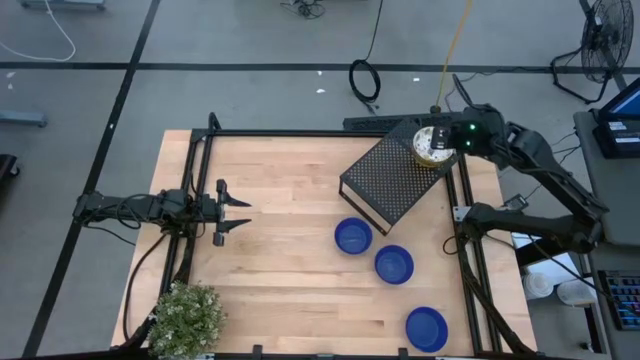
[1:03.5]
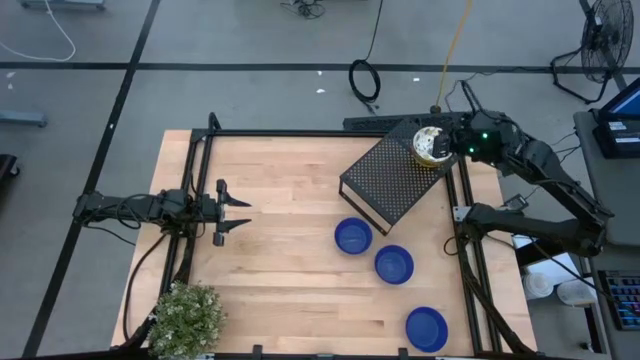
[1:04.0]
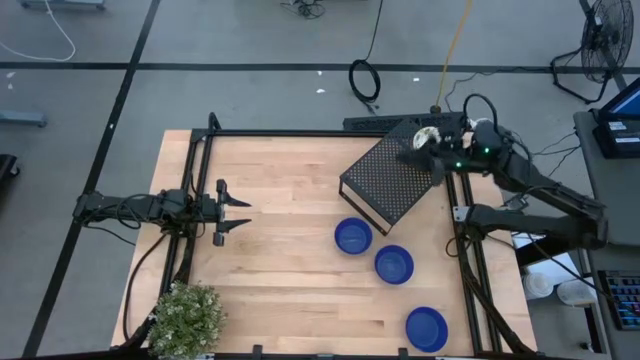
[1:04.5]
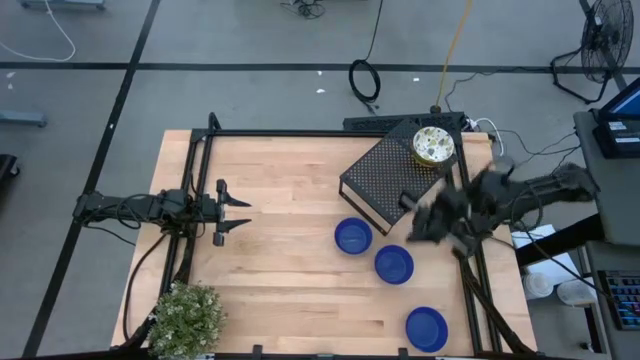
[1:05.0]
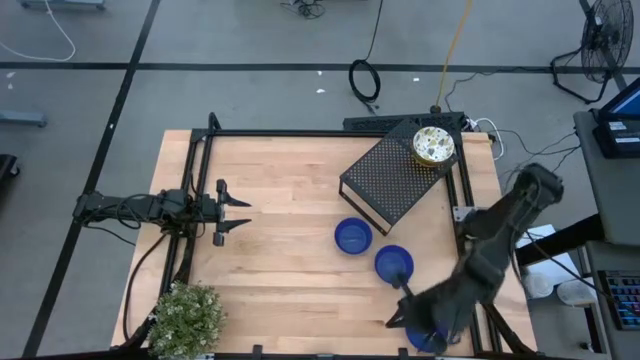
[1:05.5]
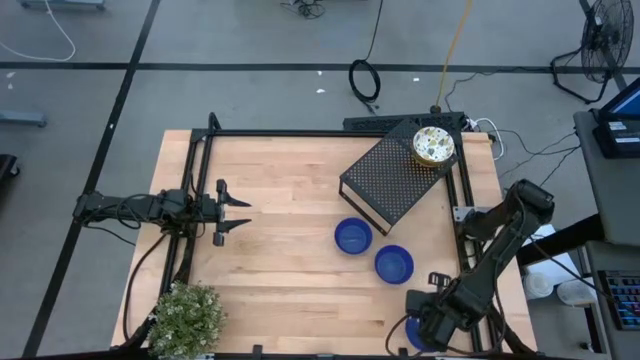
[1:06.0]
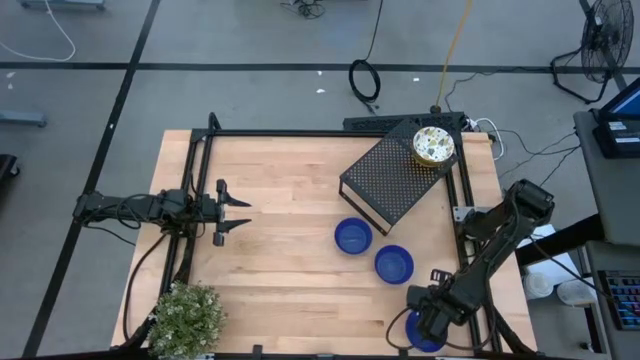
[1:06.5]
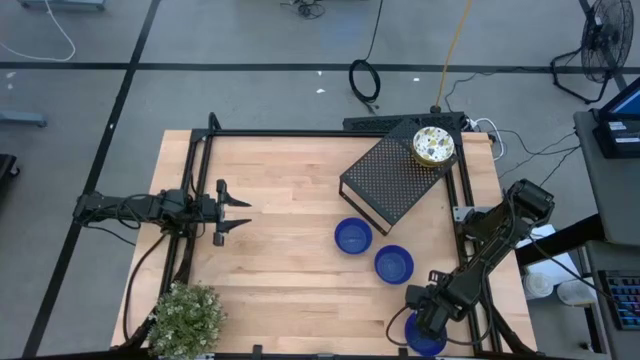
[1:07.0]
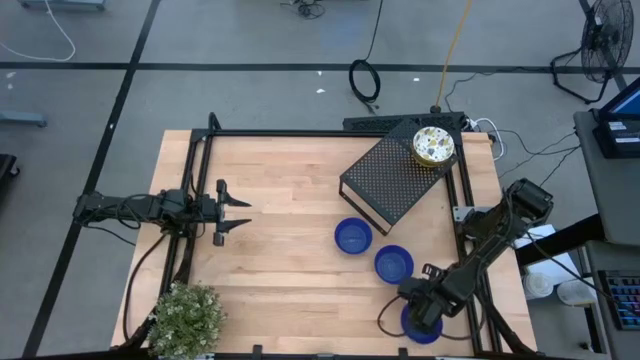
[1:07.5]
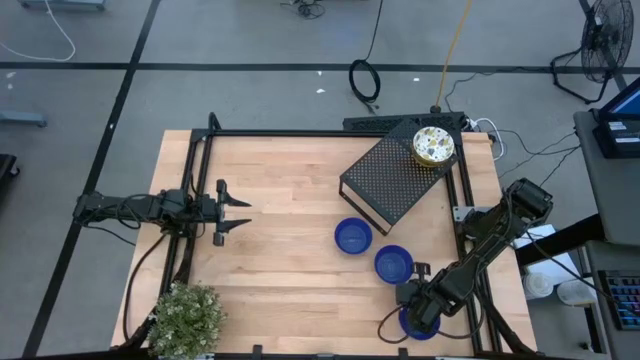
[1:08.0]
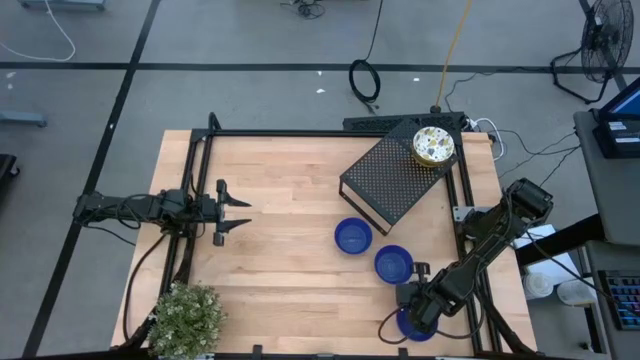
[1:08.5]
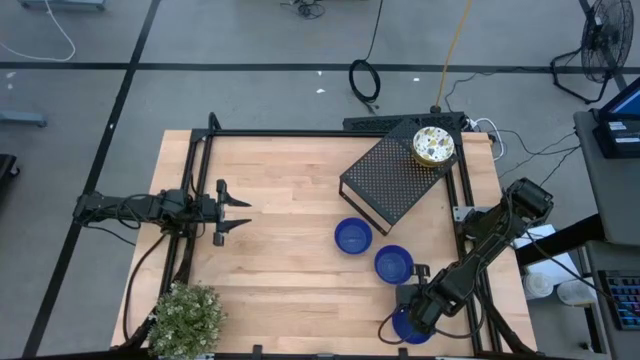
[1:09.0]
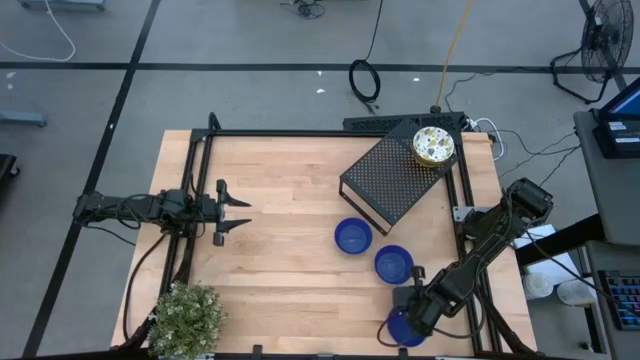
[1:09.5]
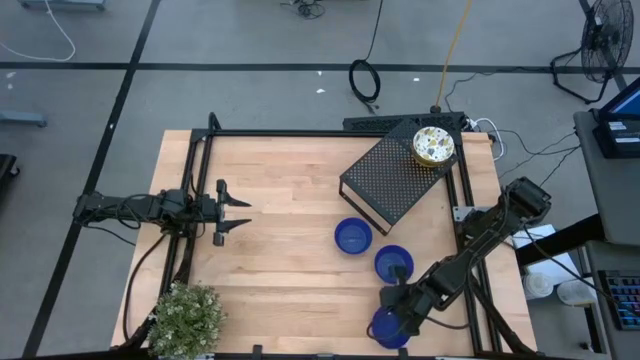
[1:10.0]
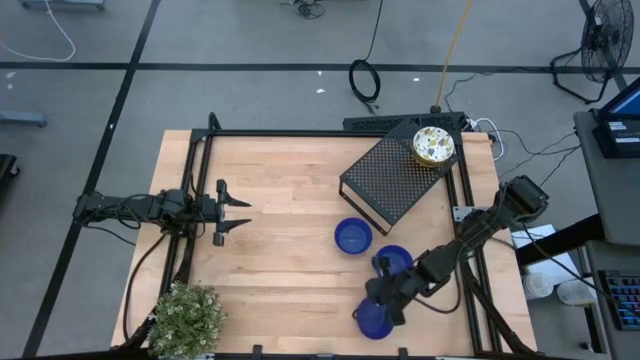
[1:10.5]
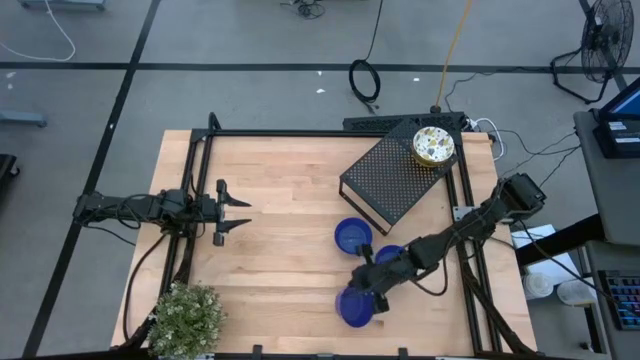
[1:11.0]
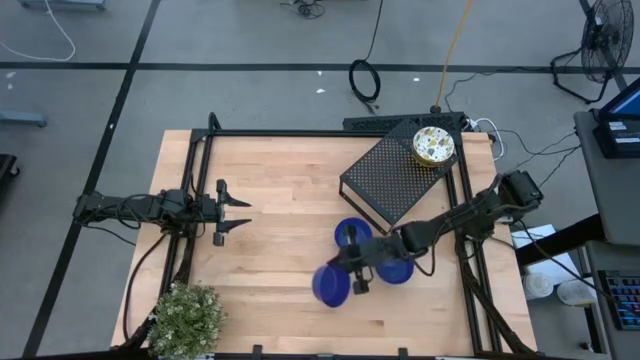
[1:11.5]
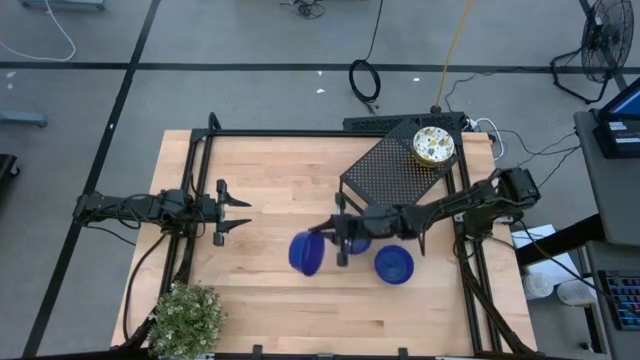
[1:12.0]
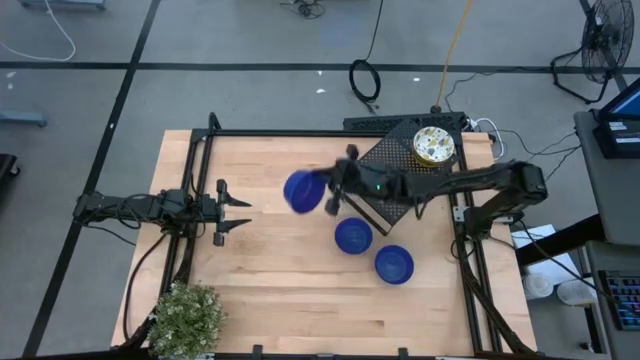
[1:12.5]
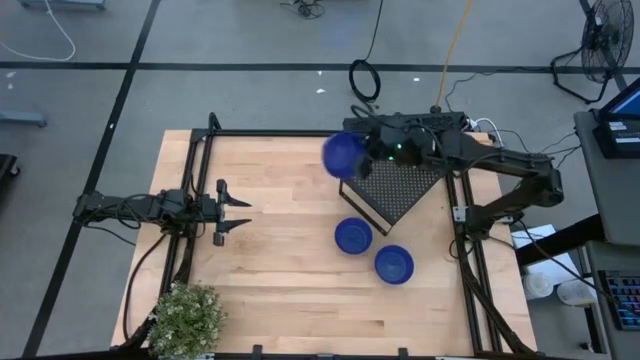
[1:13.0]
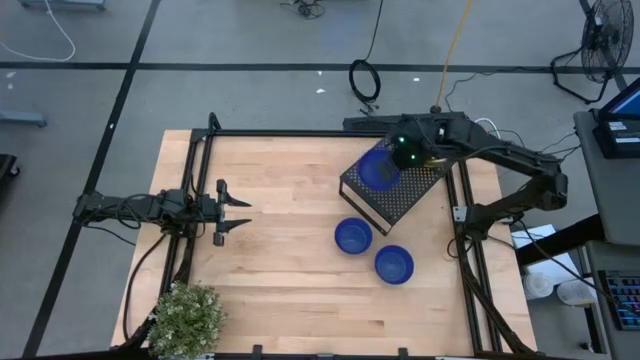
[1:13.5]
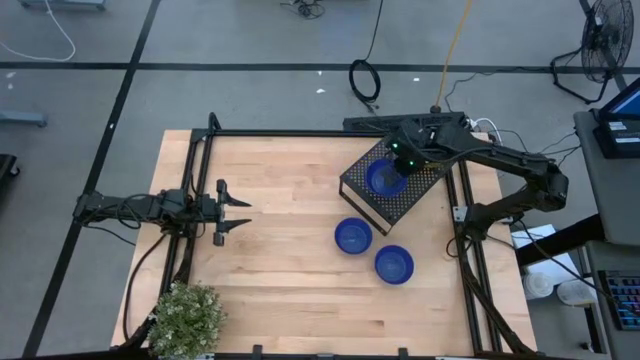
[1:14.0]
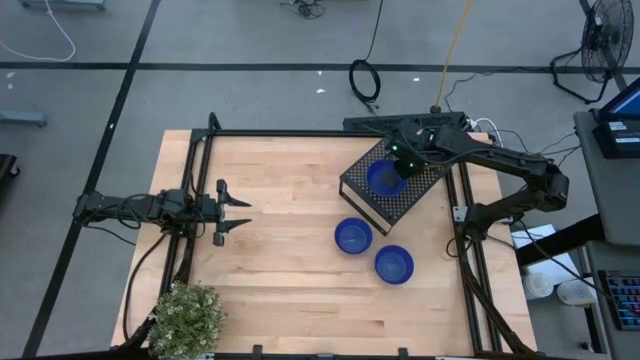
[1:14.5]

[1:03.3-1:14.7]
Task: Pick & Place Mini bowls
Put the bottom blue bowl on the shelf

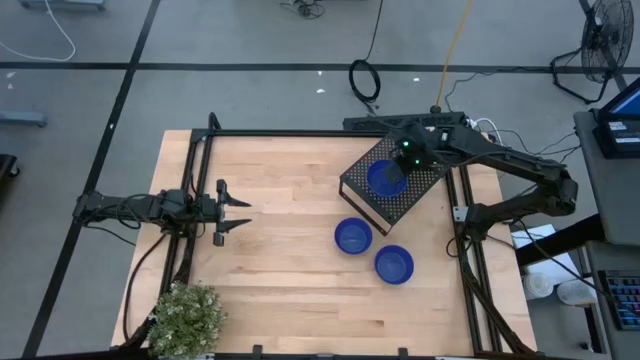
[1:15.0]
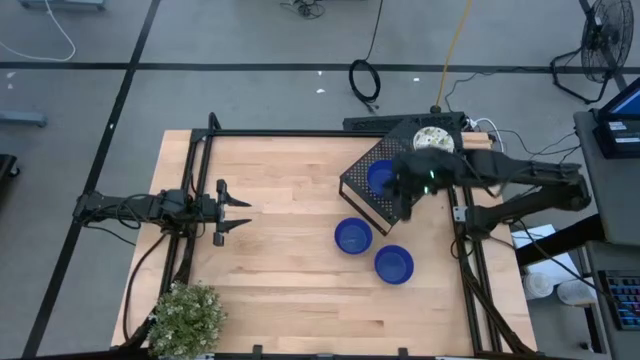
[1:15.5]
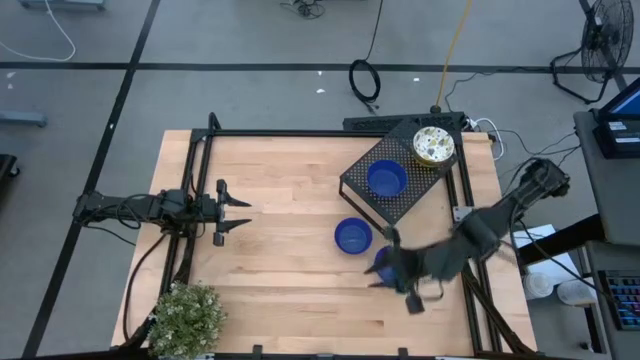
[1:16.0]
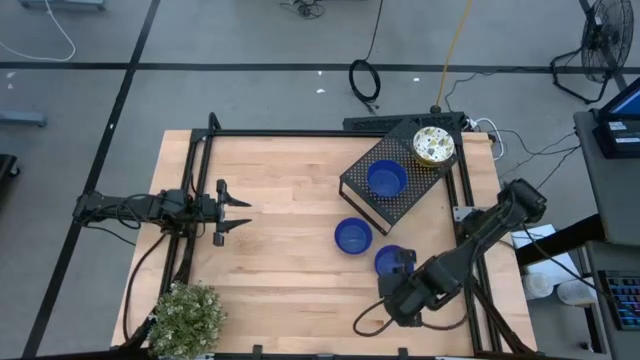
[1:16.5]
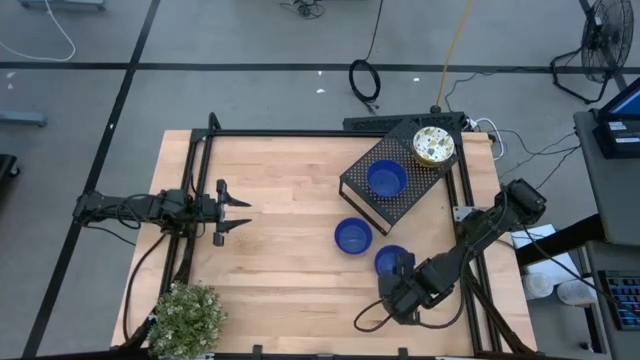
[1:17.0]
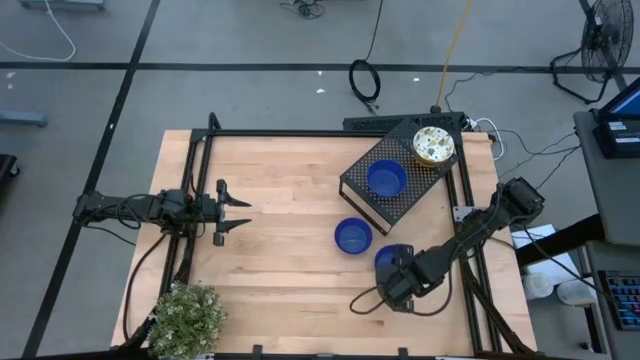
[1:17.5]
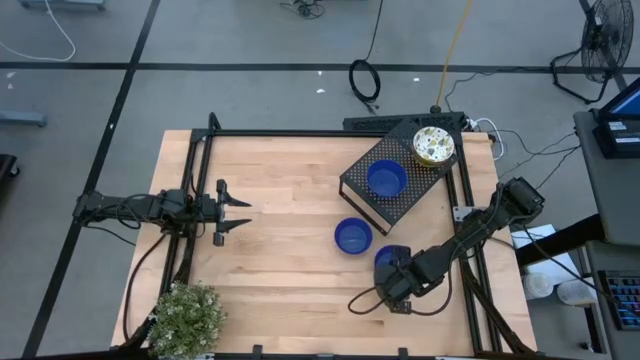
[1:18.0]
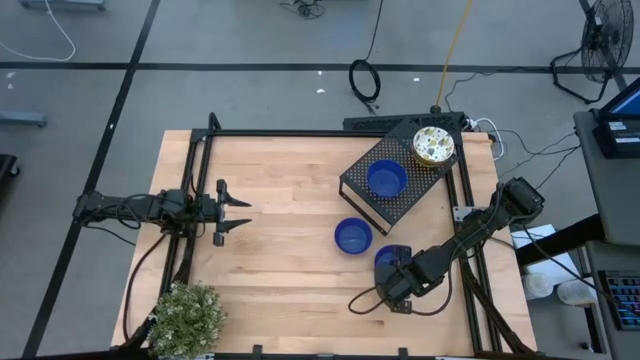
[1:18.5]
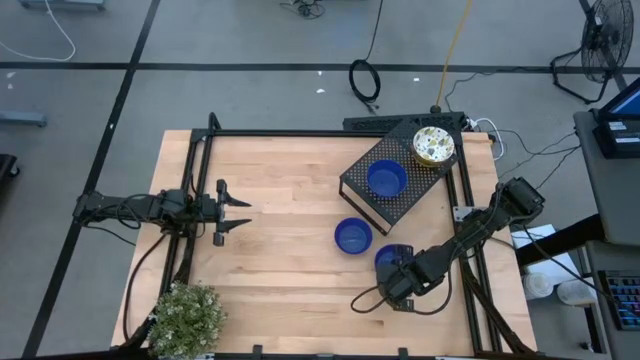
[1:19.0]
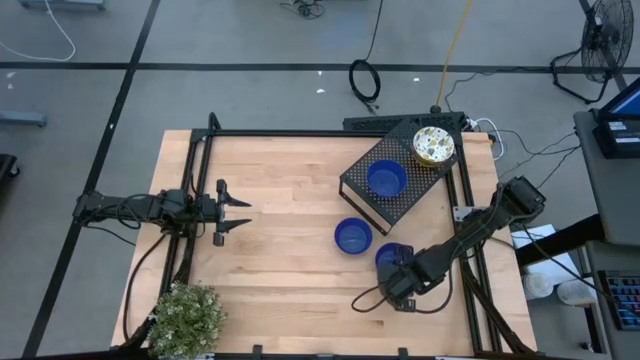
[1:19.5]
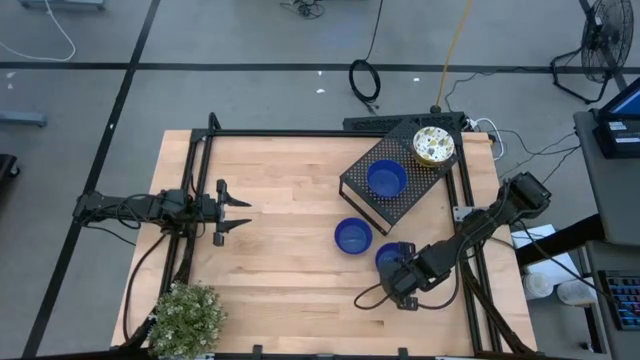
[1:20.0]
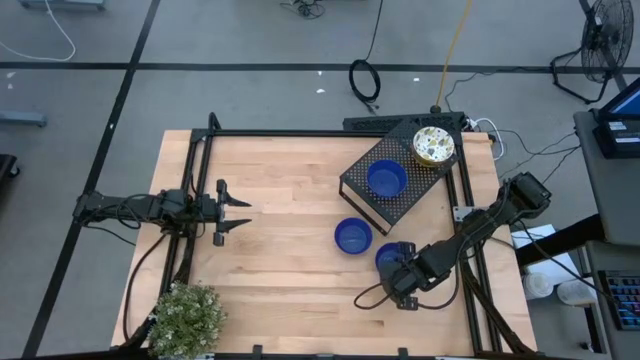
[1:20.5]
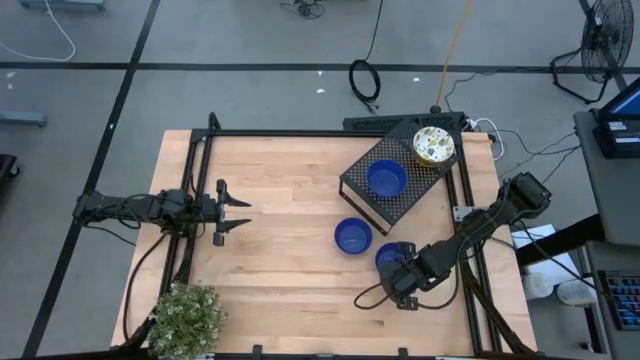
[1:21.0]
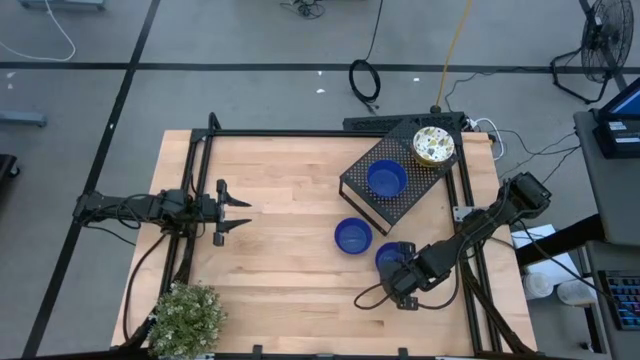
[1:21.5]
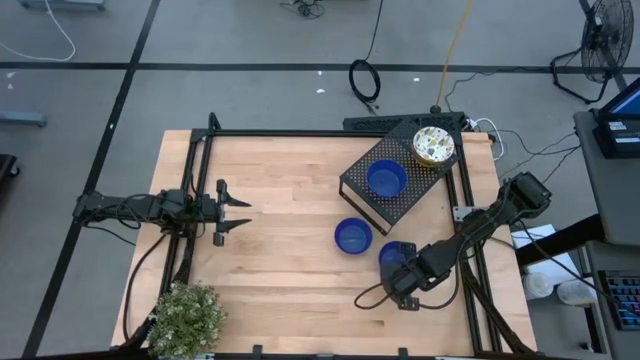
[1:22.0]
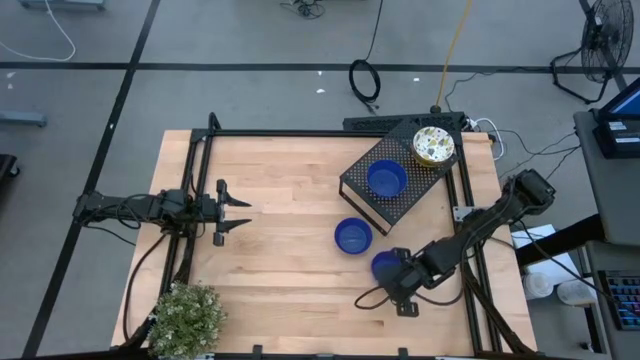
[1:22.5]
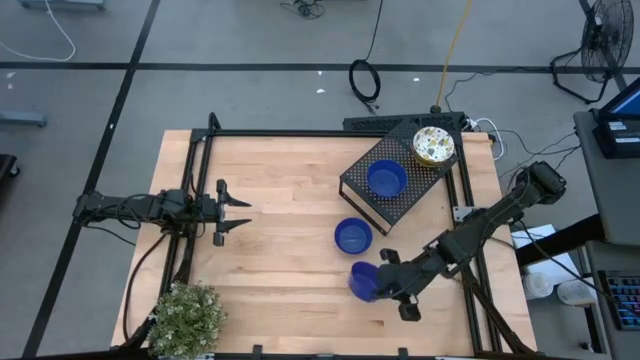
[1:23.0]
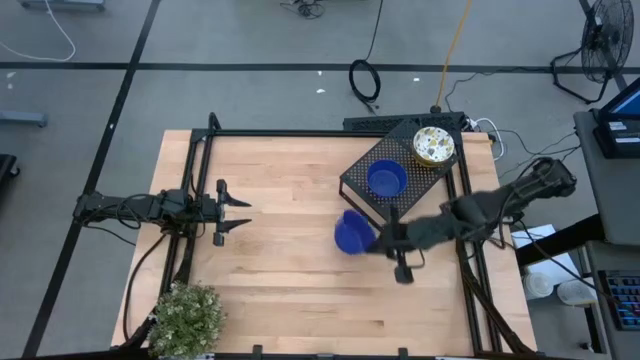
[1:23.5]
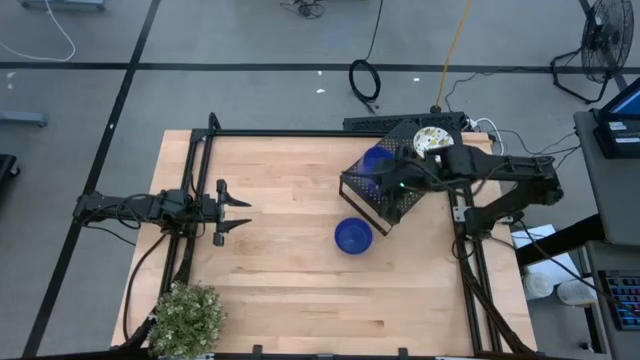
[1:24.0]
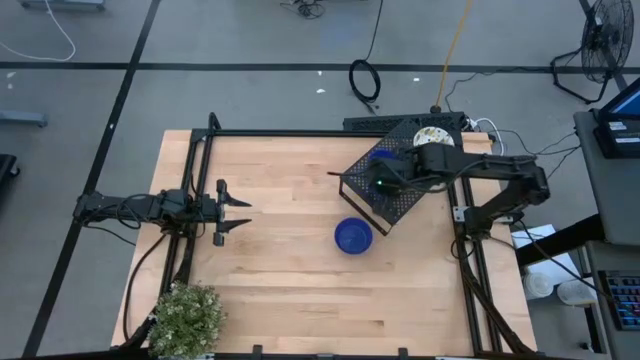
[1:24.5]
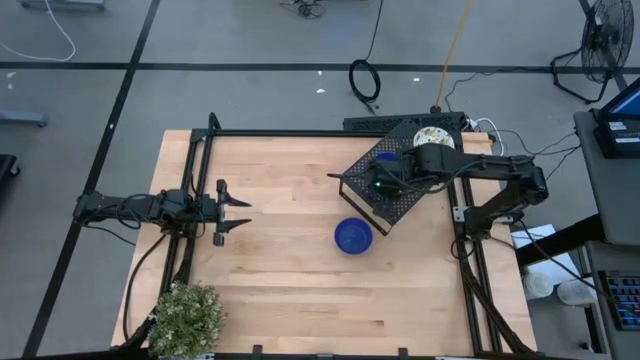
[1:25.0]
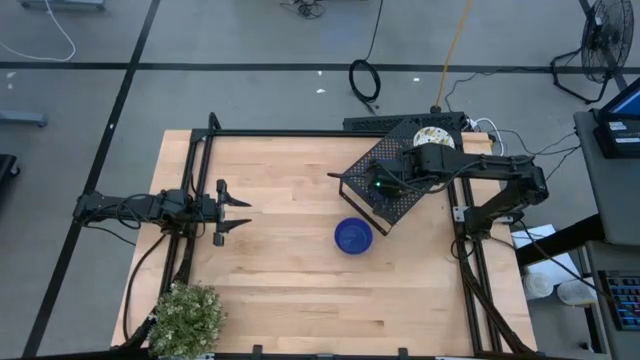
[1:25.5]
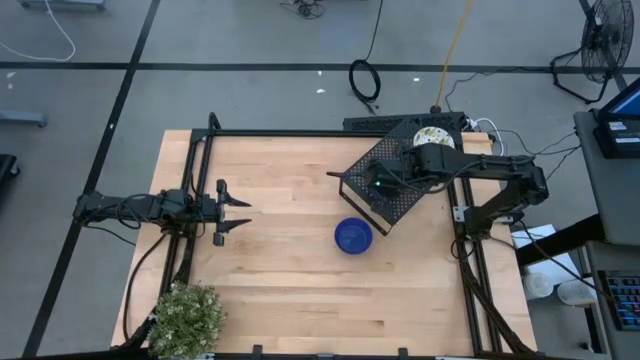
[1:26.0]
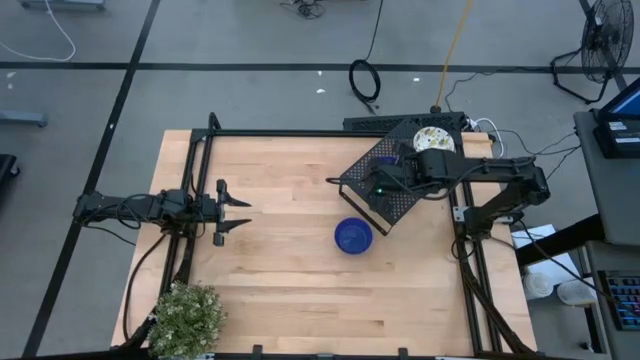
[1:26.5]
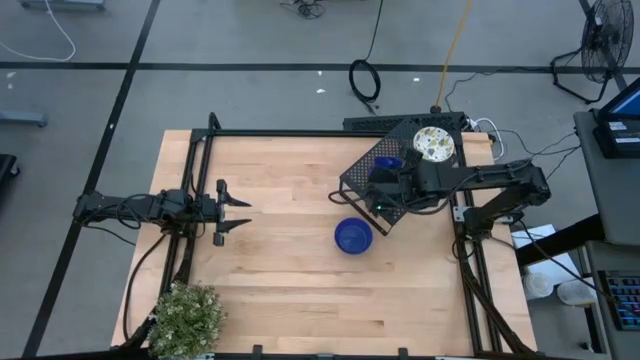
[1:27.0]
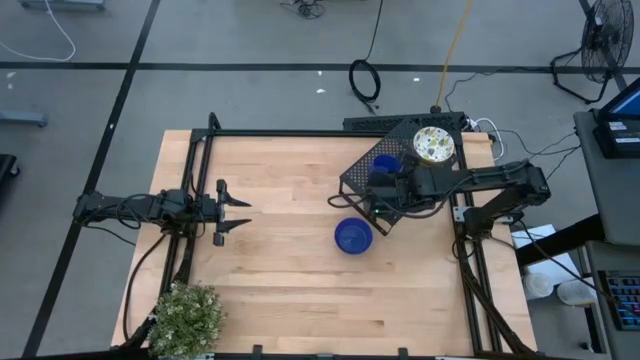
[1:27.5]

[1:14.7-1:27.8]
Stack the right blue bowl on the blue bowl on the shelf
